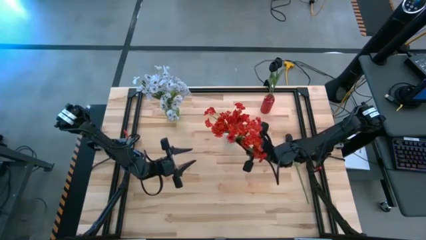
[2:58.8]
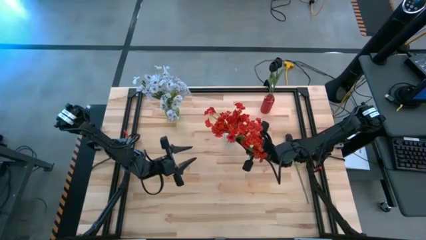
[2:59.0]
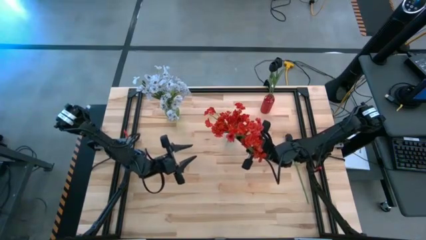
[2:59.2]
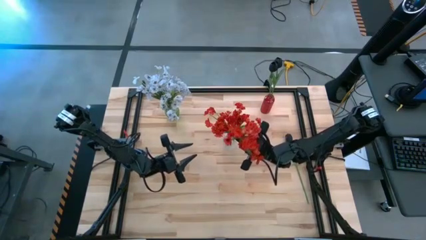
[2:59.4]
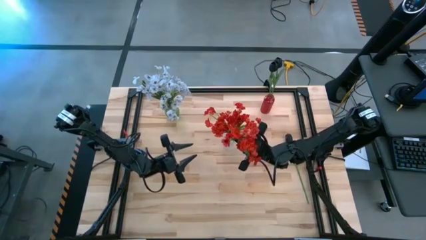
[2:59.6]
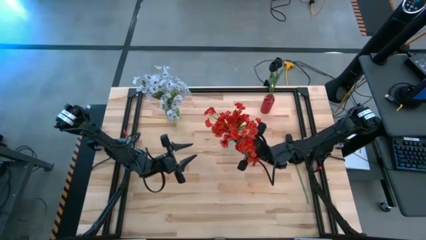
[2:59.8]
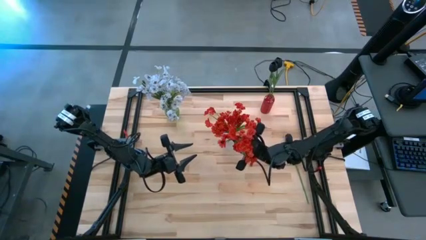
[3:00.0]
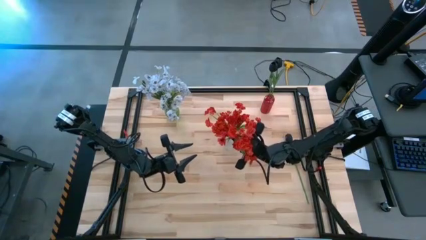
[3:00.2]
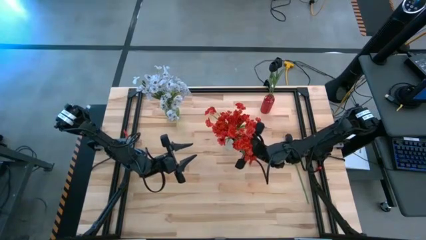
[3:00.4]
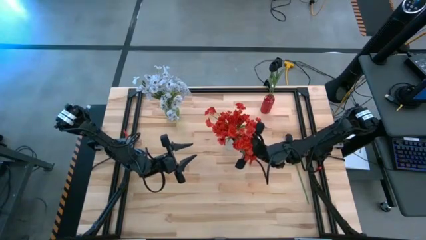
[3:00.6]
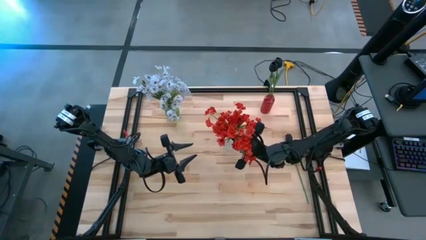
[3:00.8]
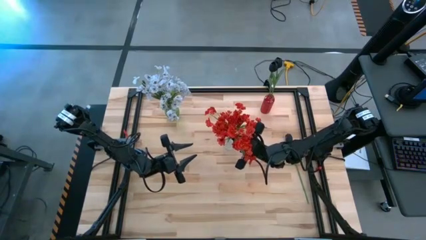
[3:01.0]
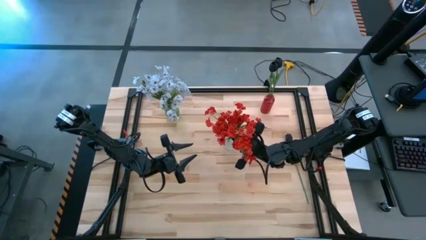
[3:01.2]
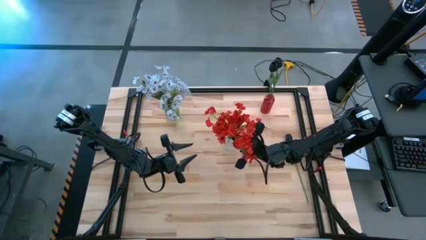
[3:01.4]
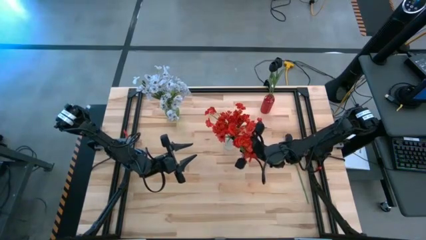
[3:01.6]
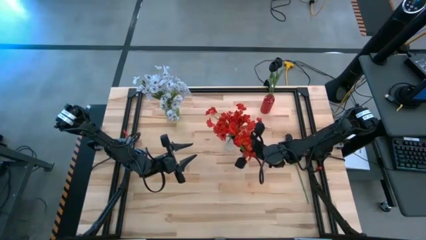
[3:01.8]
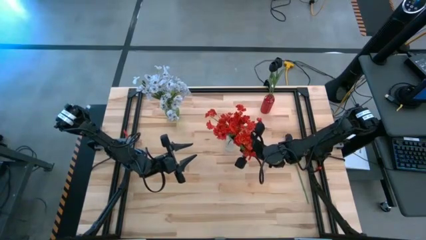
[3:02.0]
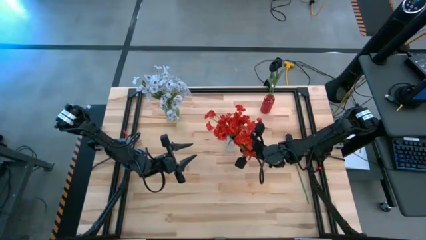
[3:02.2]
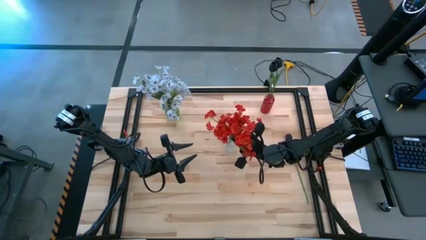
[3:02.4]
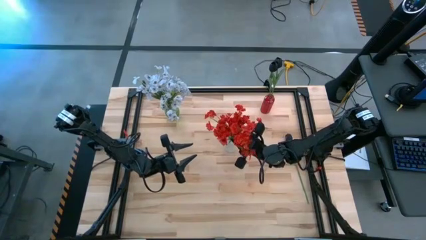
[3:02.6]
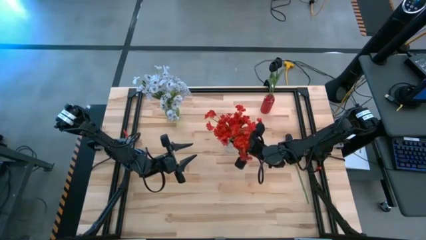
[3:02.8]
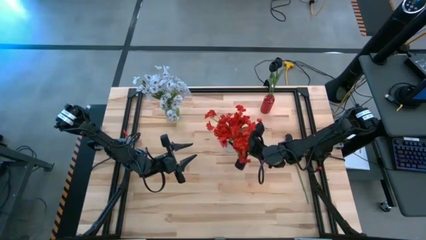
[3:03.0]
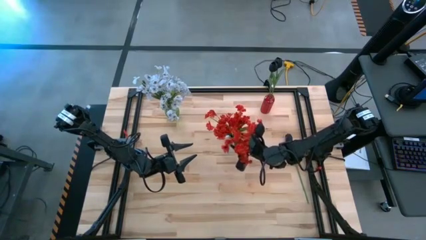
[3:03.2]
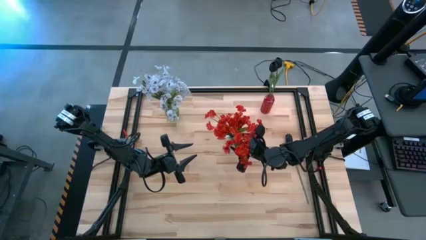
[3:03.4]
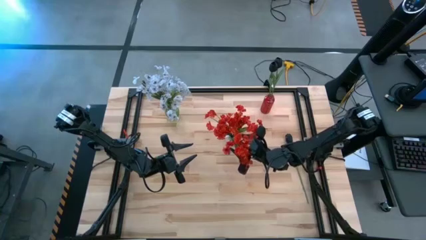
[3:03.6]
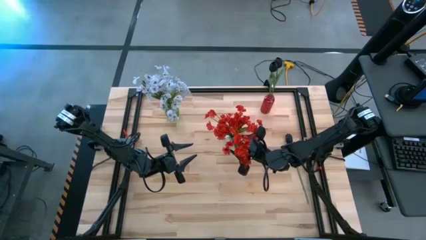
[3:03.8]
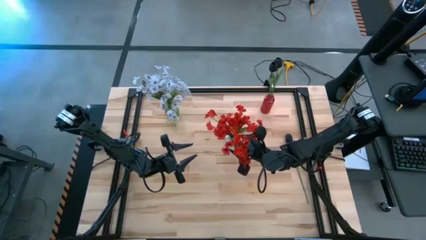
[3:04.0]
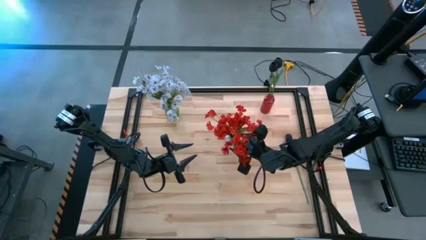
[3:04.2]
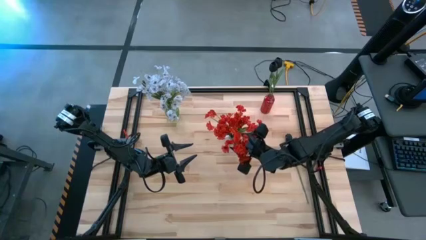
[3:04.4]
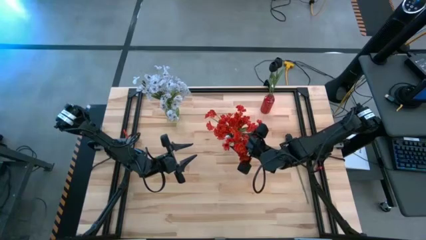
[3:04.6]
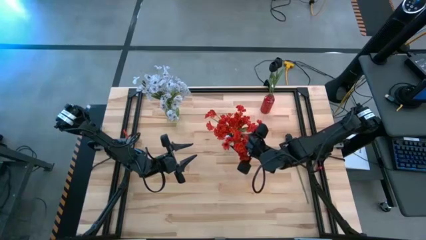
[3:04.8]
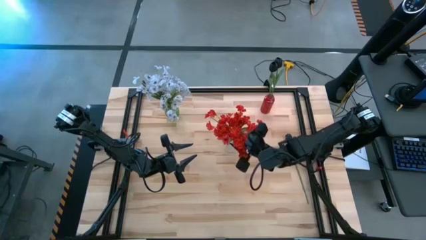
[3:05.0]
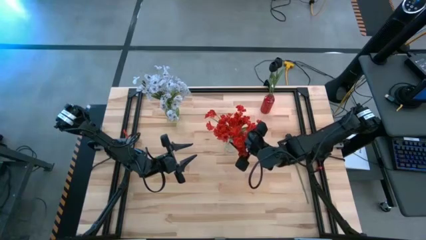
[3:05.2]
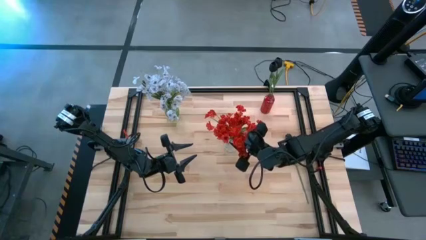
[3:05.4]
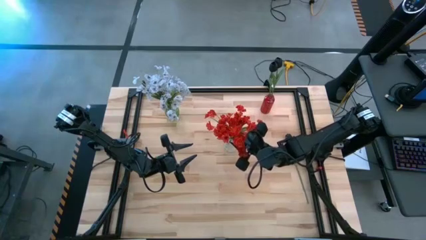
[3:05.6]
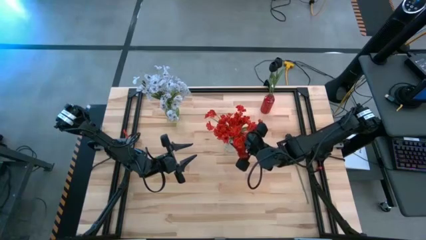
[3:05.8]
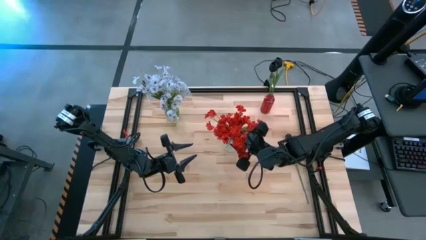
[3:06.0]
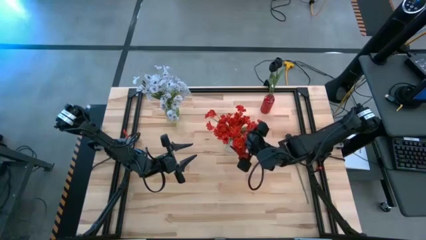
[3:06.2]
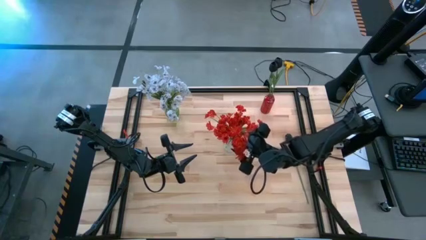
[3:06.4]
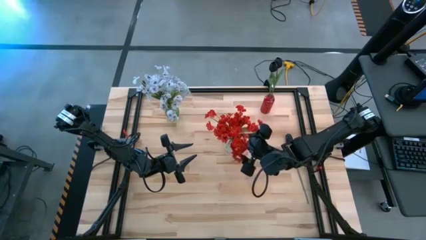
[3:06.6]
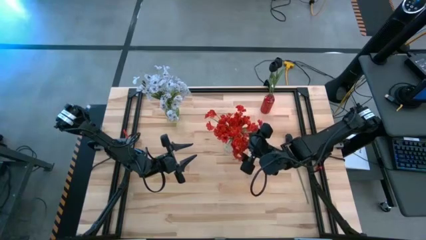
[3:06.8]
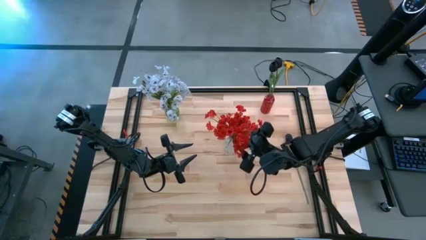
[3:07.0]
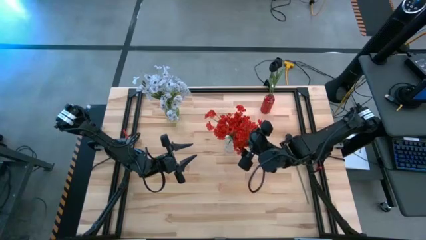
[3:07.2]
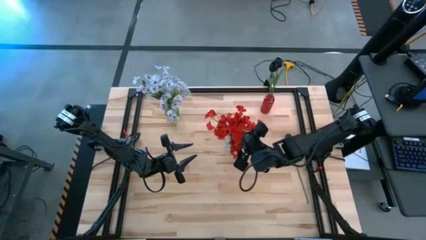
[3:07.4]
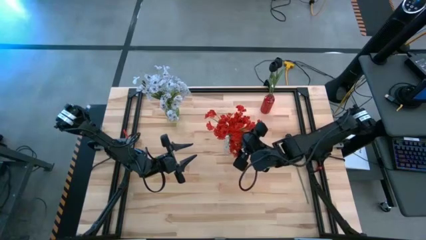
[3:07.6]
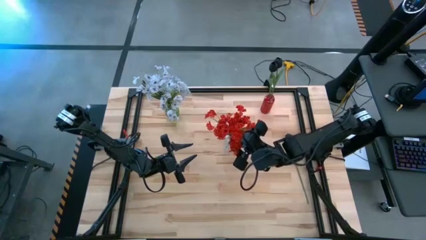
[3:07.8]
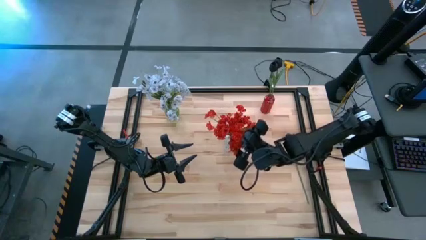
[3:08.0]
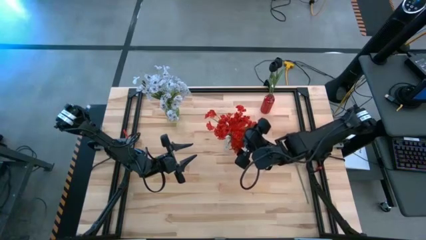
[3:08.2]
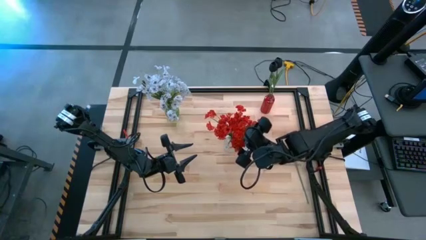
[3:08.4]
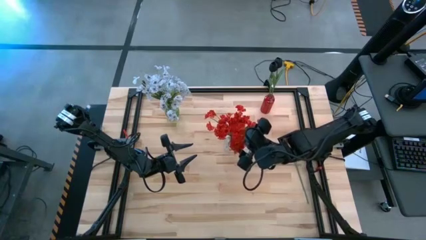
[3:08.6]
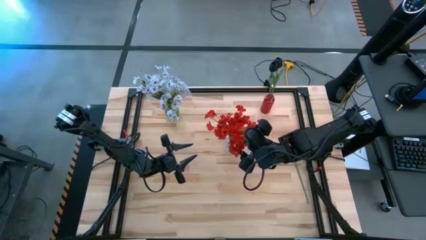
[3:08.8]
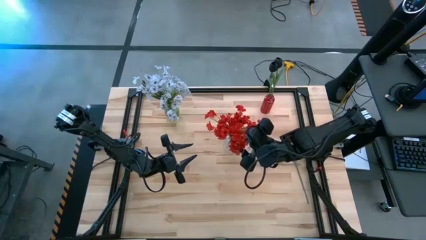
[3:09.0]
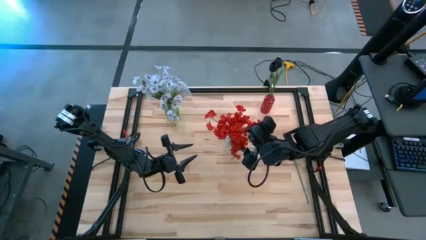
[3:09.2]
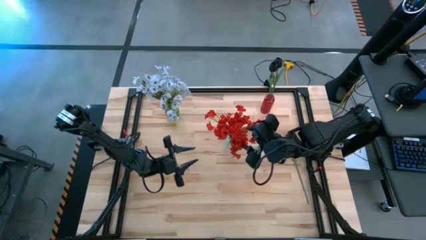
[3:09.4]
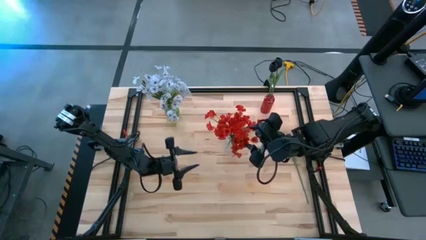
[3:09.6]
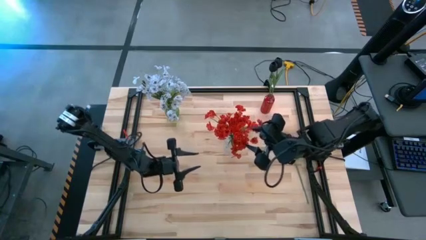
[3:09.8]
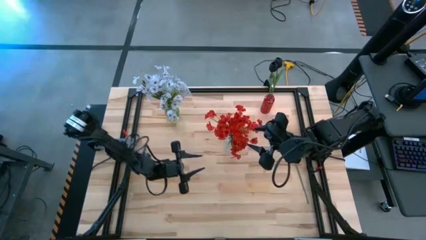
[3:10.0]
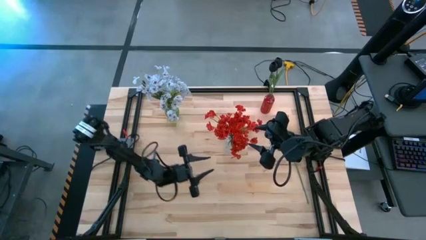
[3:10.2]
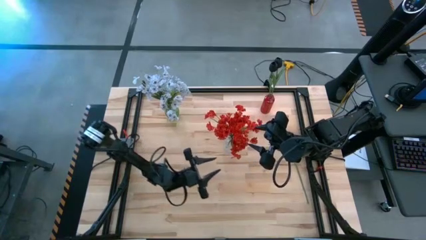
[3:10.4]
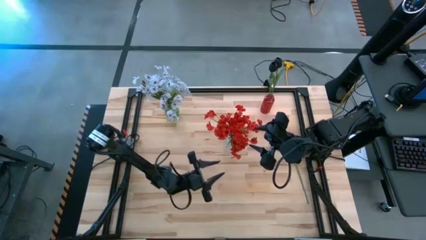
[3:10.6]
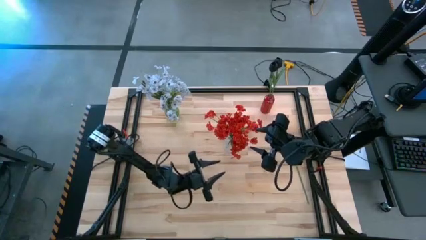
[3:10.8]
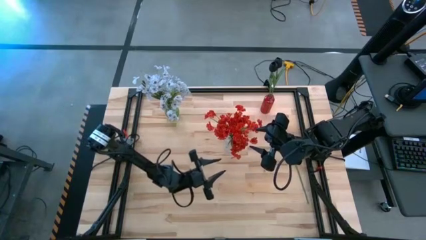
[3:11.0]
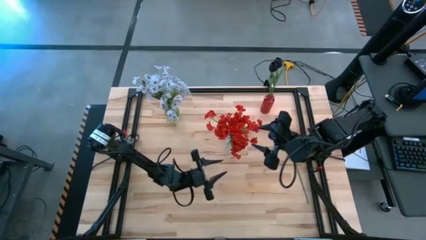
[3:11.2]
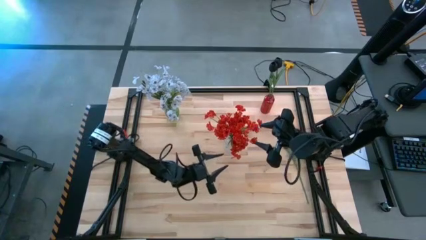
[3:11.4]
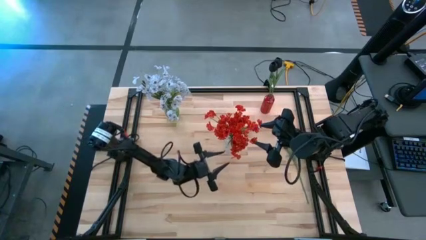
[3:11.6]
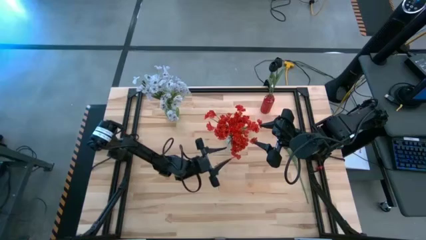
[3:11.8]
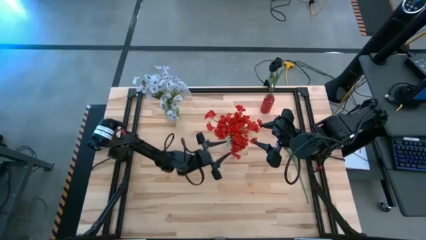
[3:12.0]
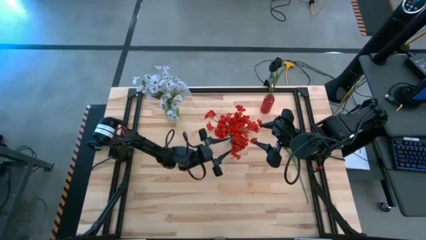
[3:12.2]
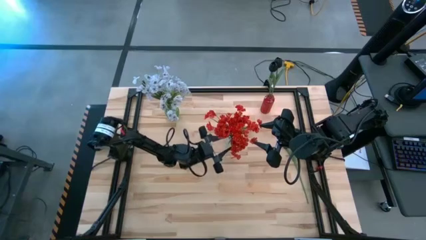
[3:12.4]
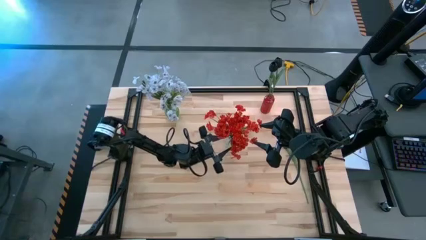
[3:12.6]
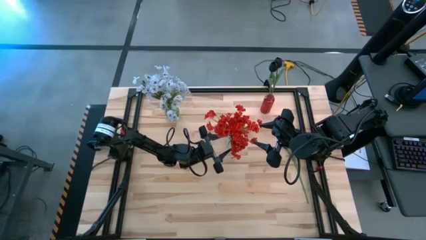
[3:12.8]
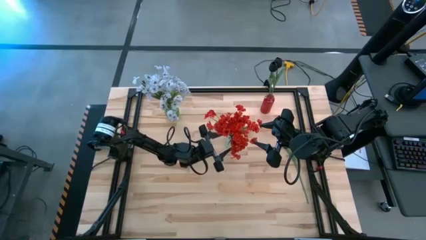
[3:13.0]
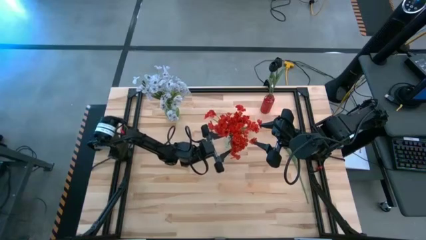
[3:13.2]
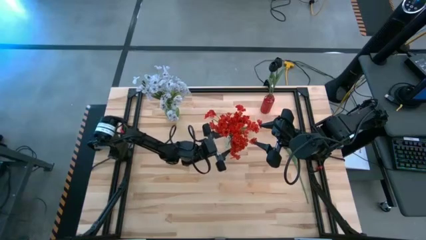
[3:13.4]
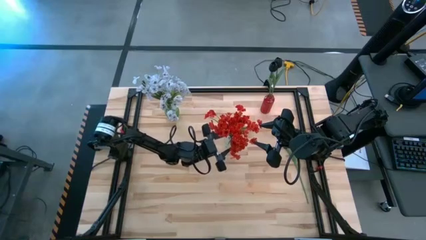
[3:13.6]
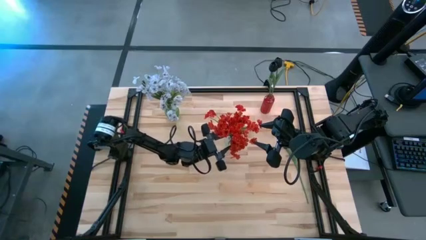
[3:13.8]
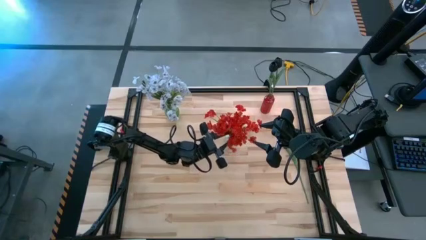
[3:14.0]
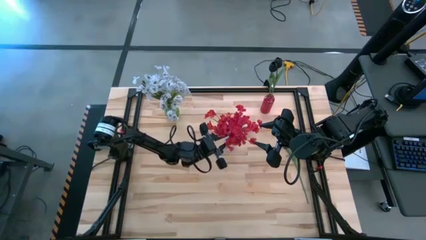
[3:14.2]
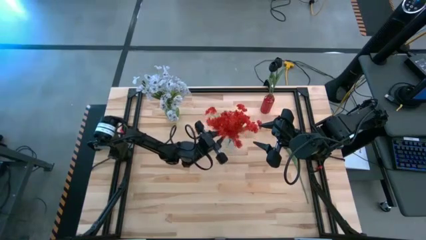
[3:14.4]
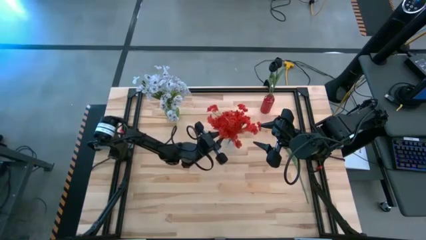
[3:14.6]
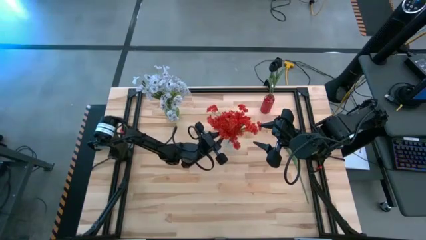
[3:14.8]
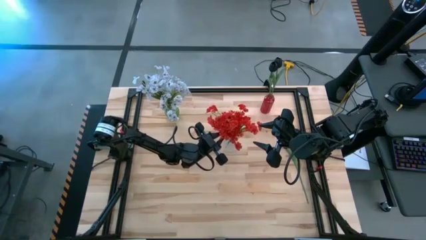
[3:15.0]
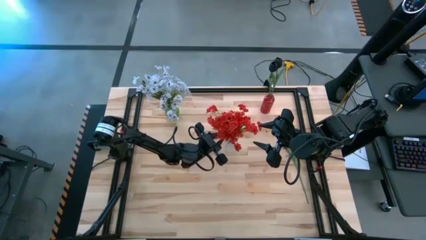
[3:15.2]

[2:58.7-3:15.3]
Task: Sort flowers into vase by color
Put the red flower into the transparent vase
